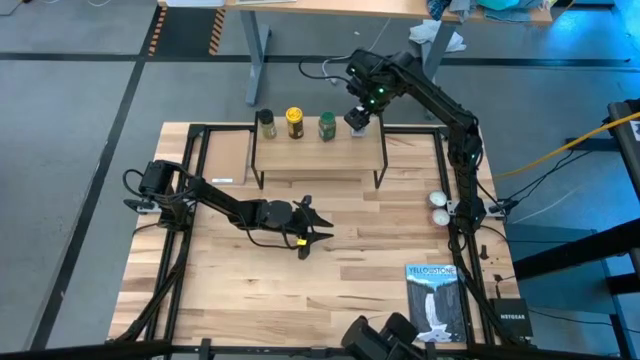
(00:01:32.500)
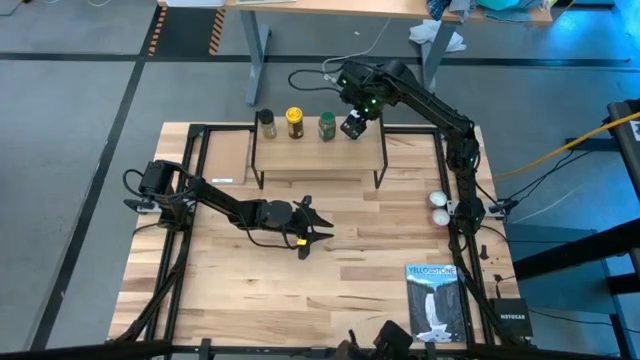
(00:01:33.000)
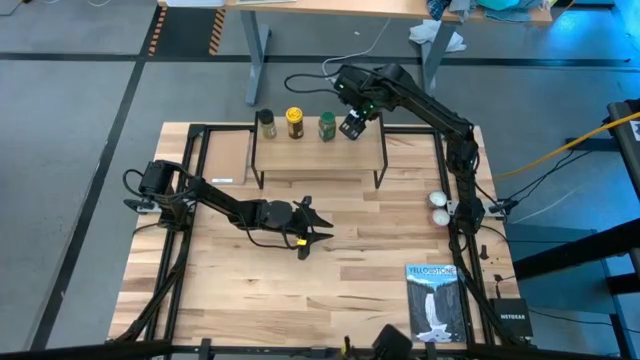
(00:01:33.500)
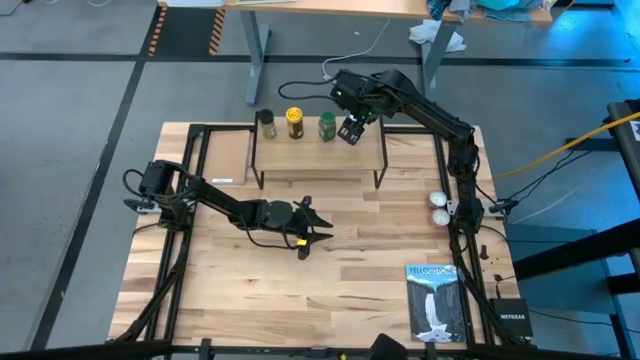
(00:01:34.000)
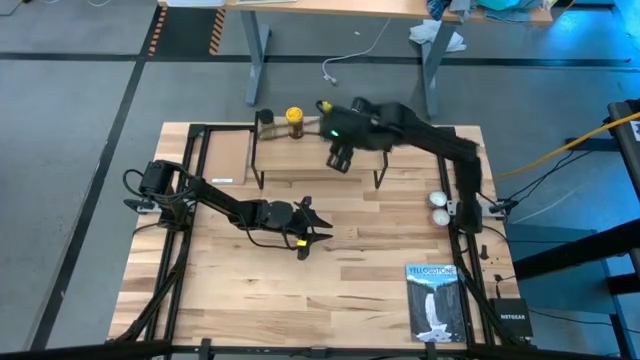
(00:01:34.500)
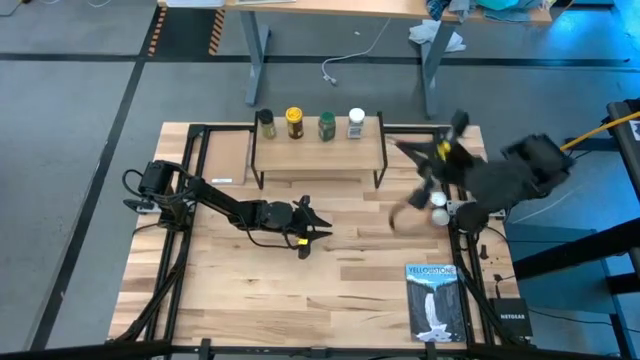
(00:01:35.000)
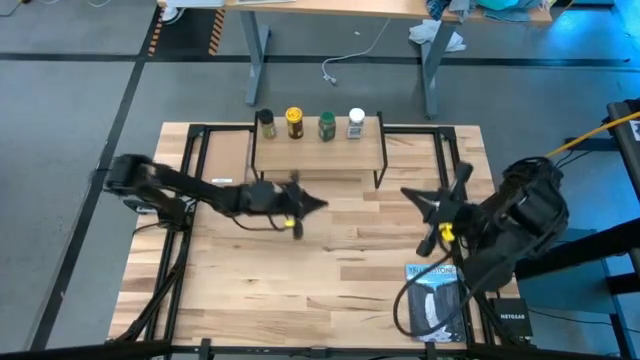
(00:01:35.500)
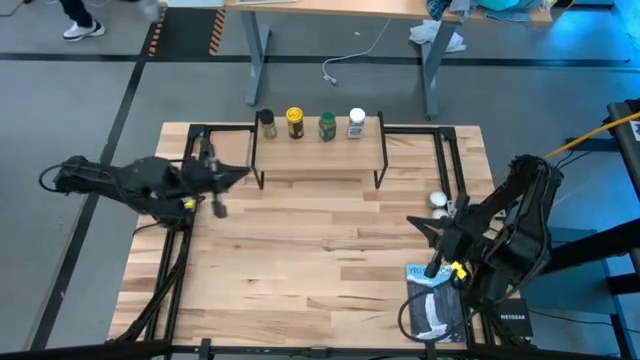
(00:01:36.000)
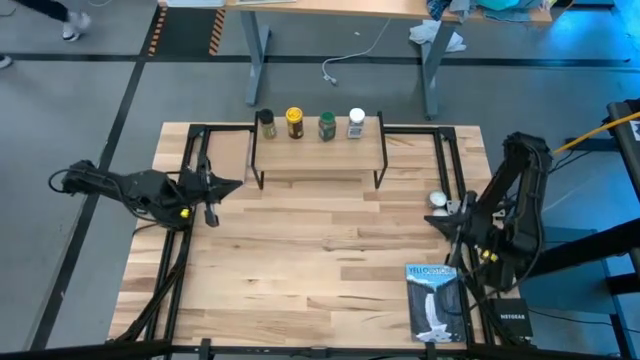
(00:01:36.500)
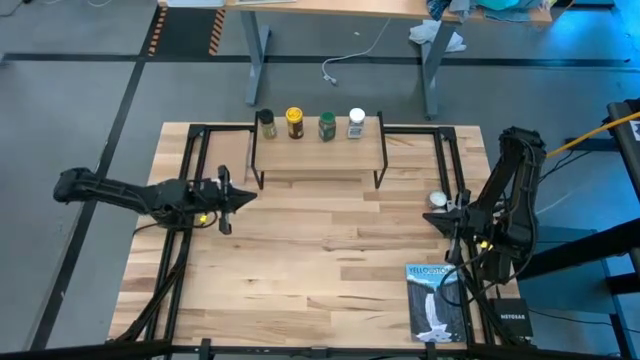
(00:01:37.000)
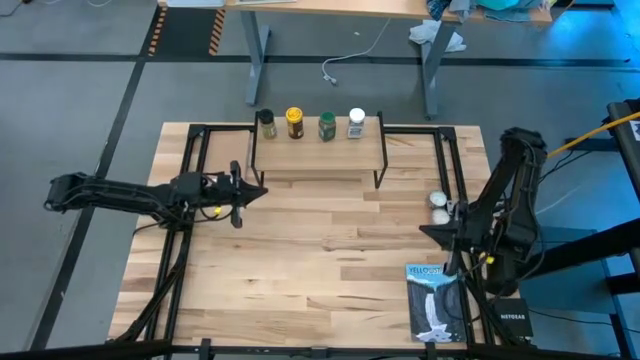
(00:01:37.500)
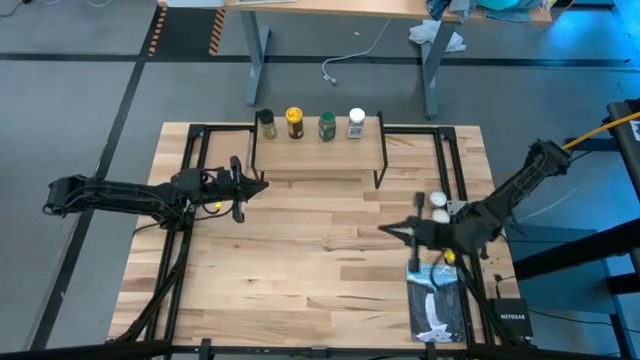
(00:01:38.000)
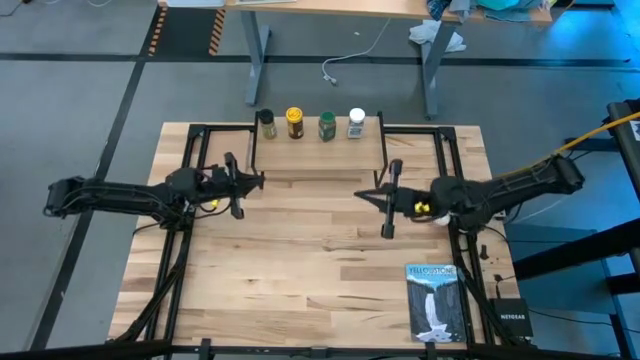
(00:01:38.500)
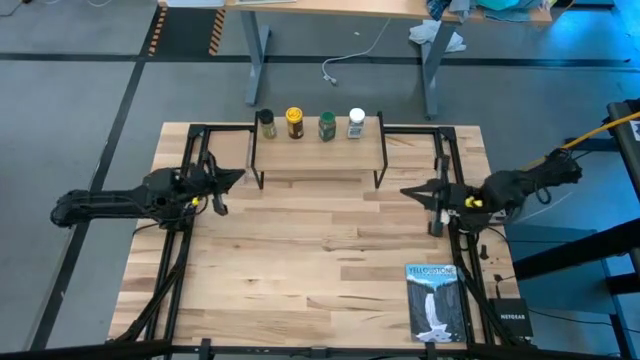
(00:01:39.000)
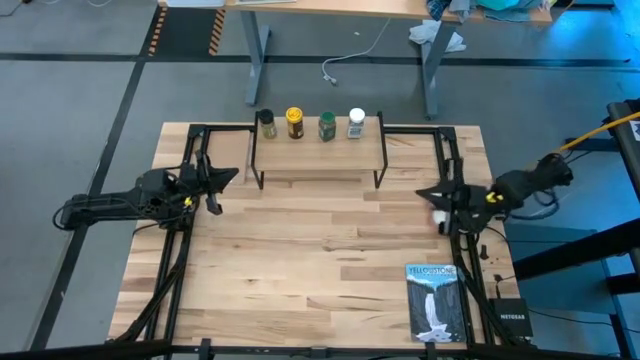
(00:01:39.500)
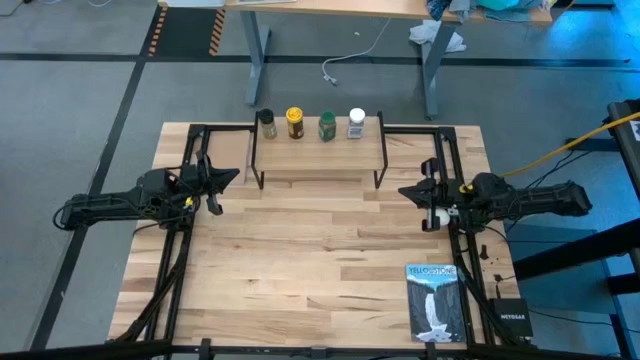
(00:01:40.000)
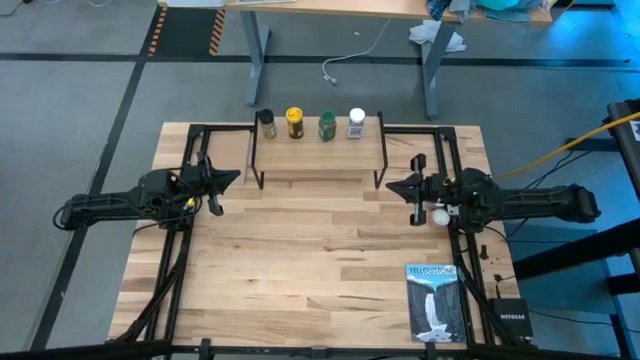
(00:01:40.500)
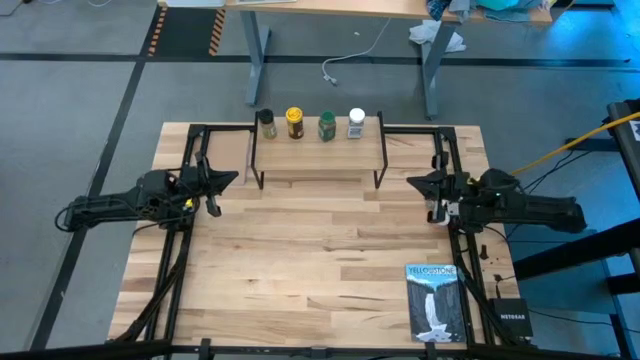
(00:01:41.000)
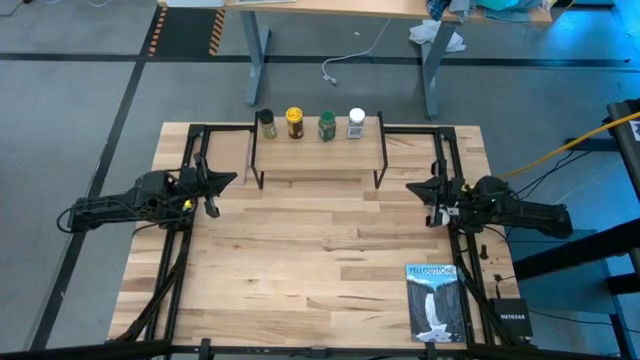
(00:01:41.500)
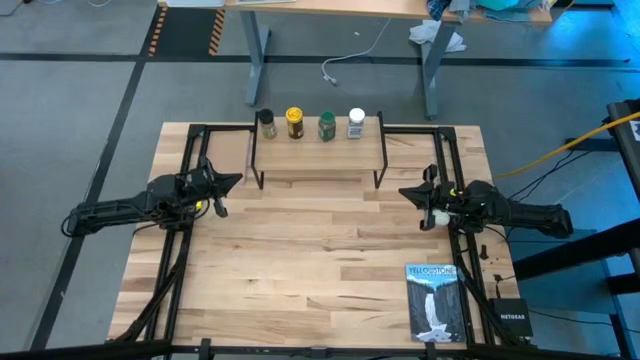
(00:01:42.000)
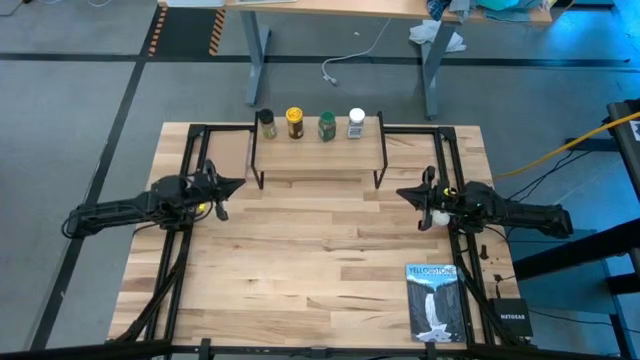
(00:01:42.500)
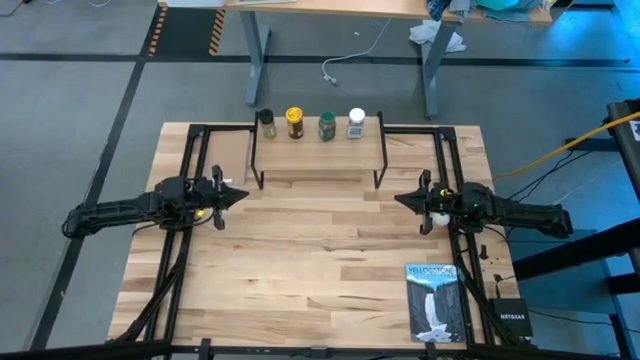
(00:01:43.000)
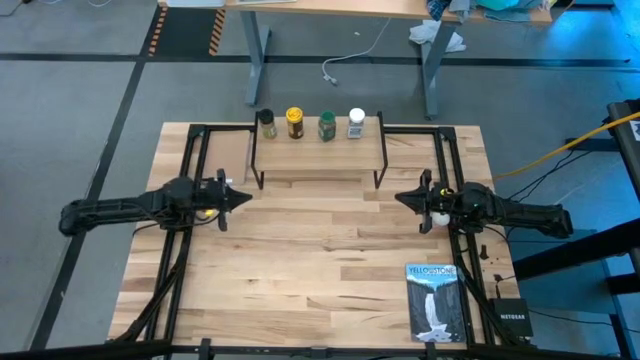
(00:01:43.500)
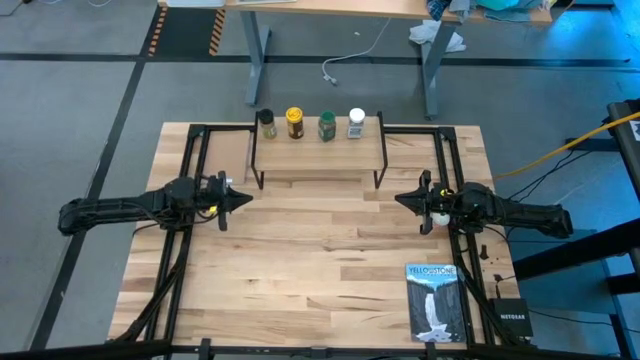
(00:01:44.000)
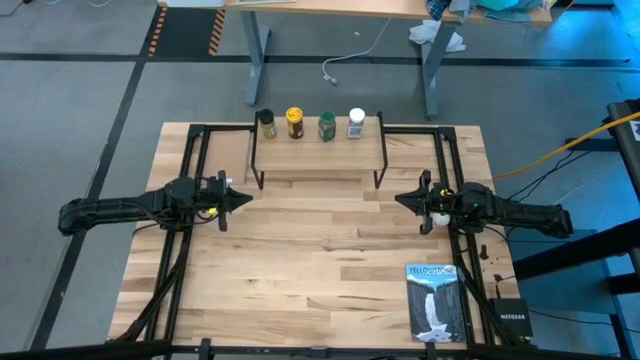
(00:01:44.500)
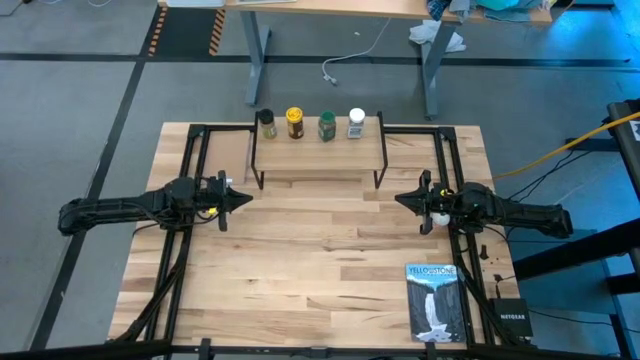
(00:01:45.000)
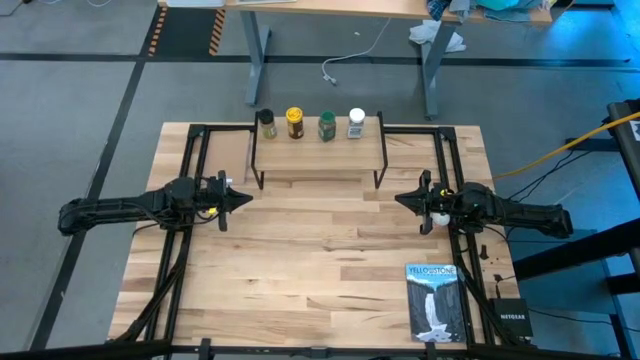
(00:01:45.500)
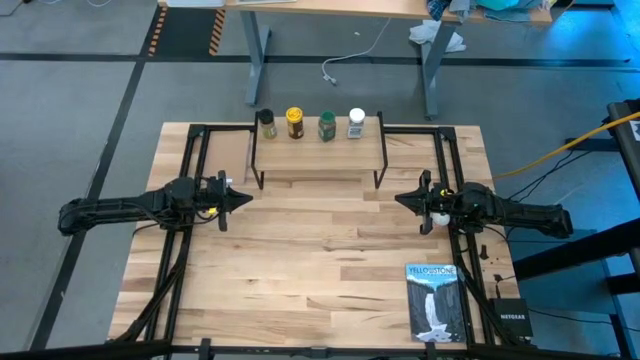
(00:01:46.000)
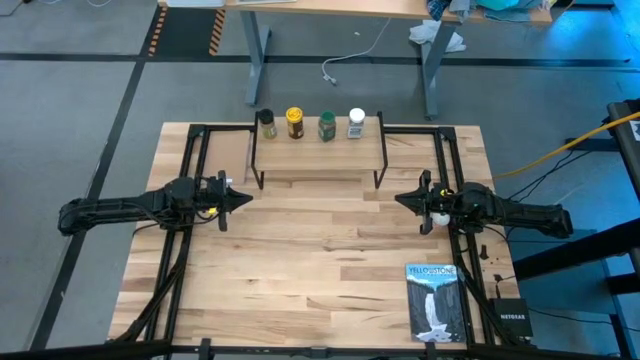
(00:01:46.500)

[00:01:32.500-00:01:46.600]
Task: Shelf spices
Return to Home Position

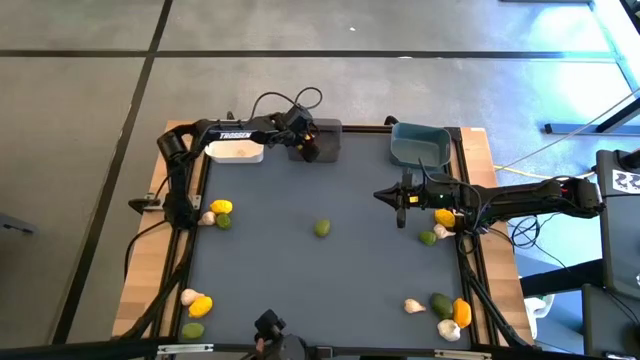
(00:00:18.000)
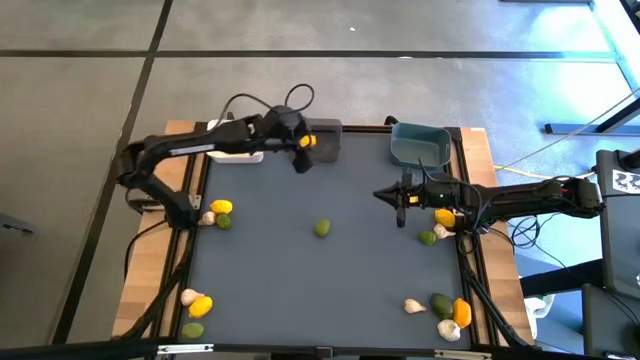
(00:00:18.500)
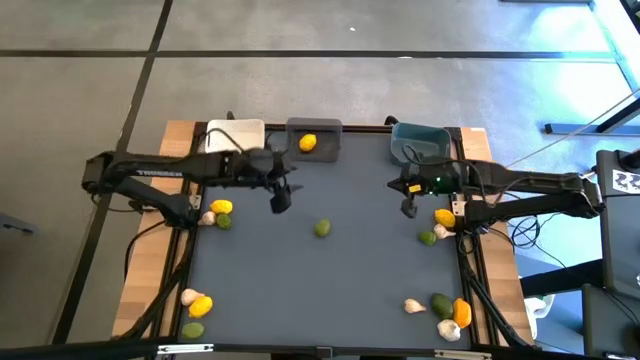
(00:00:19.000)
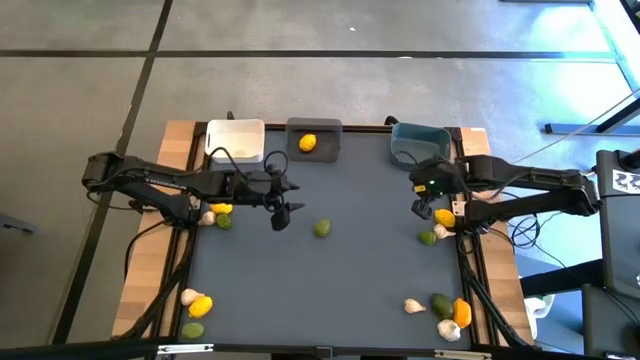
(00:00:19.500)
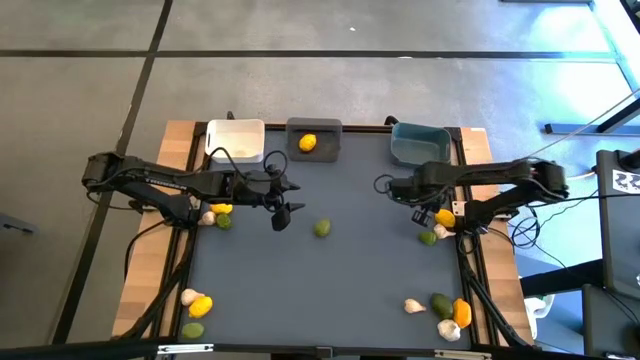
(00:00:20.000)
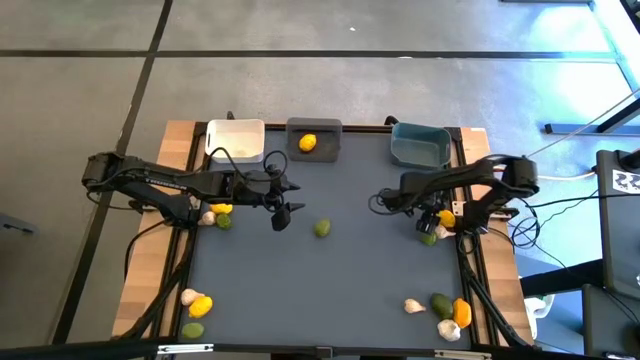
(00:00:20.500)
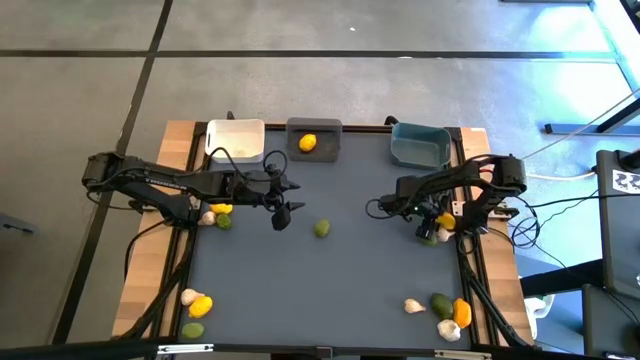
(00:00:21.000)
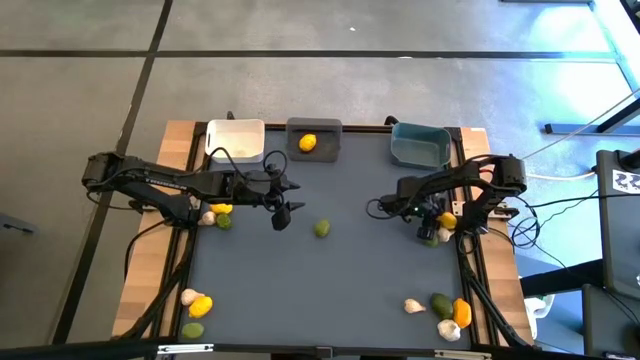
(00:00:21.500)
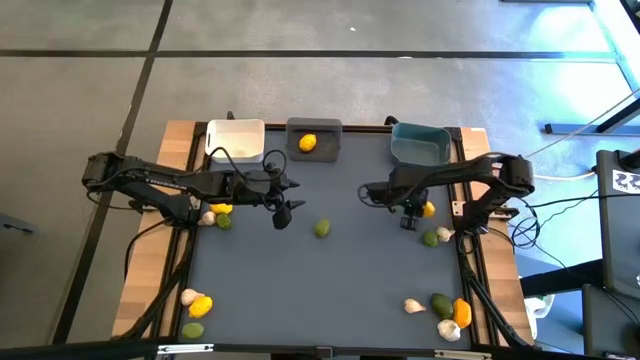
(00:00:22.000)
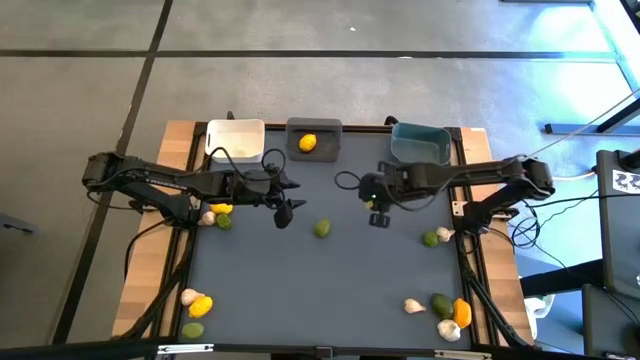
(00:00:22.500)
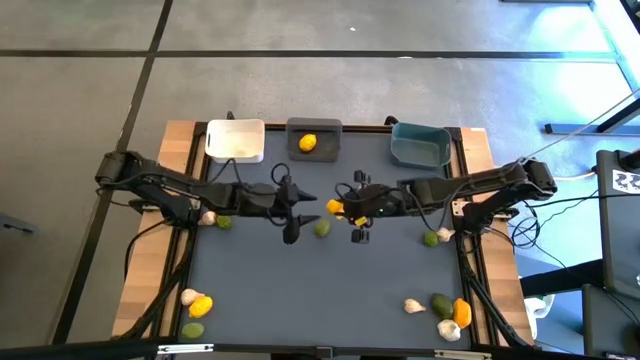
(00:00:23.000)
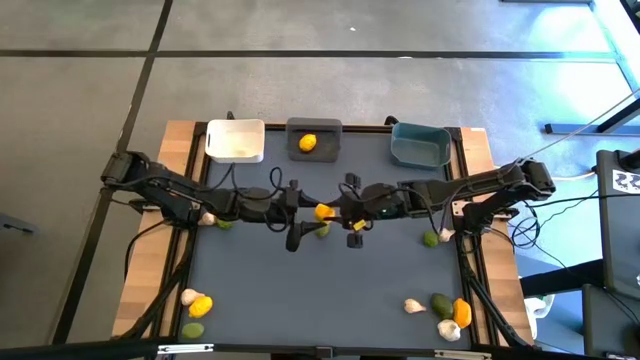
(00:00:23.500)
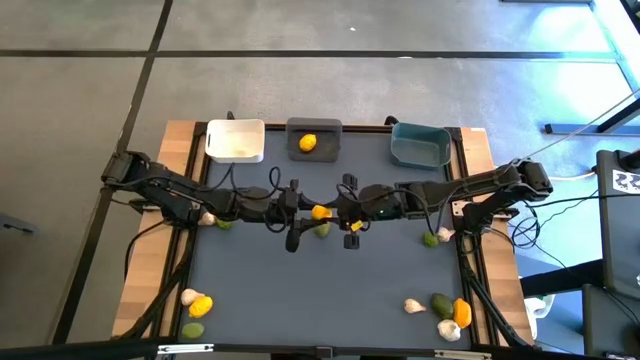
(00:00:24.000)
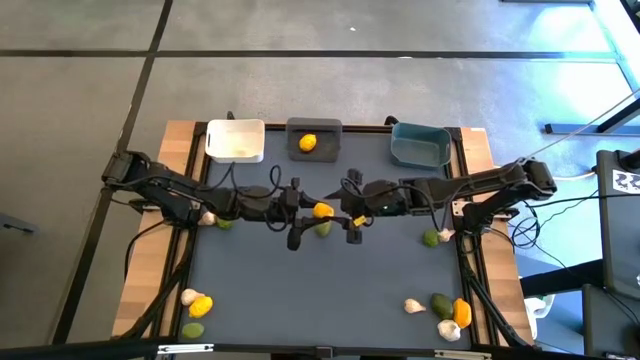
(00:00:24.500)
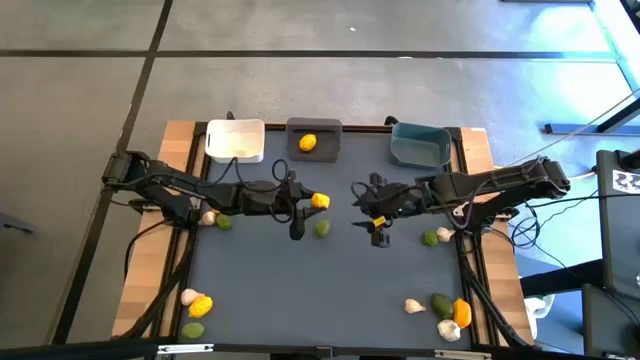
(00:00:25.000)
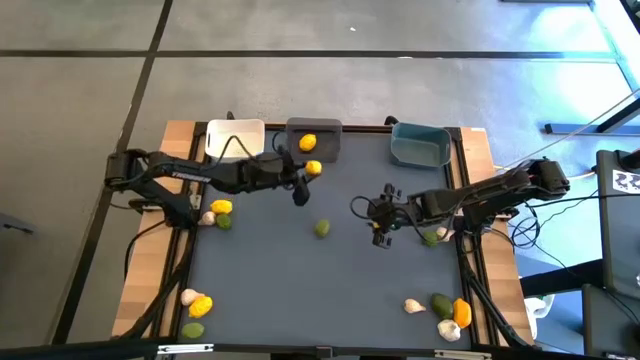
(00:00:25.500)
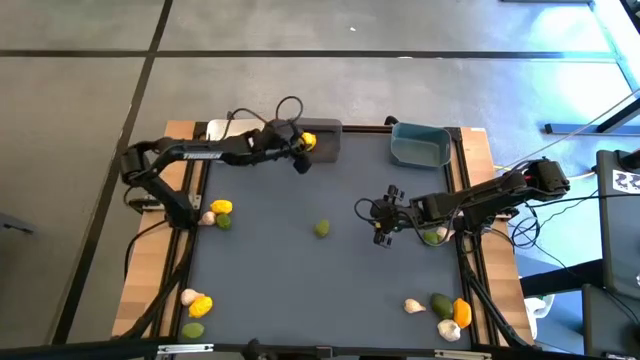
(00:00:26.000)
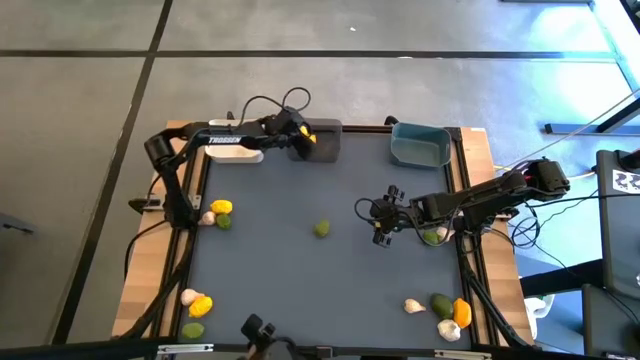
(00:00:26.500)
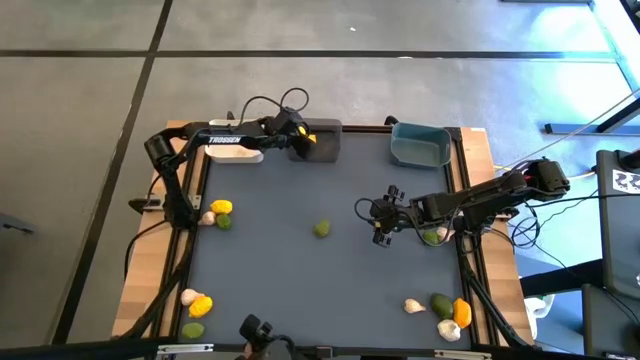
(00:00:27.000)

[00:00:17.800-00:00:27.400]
Task: Sort produce into baskets
Put the lemon into the black transparent bin
